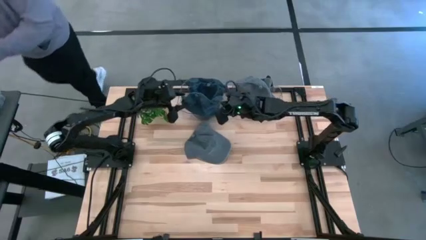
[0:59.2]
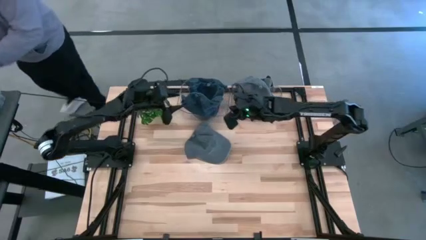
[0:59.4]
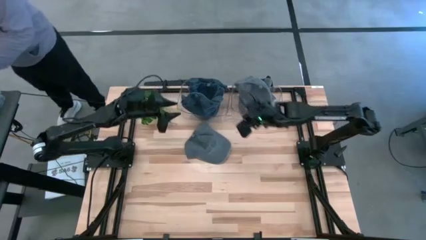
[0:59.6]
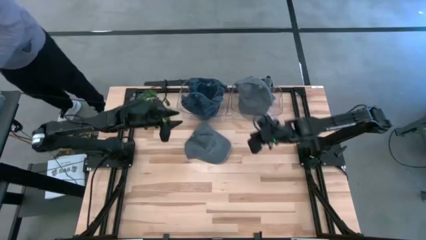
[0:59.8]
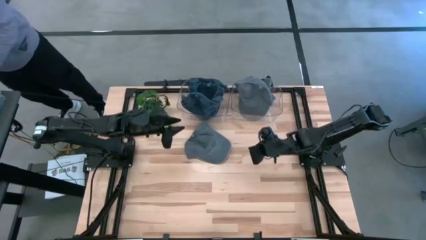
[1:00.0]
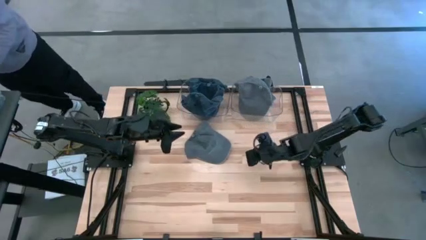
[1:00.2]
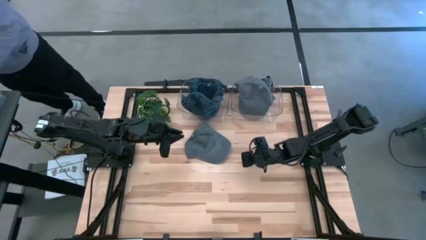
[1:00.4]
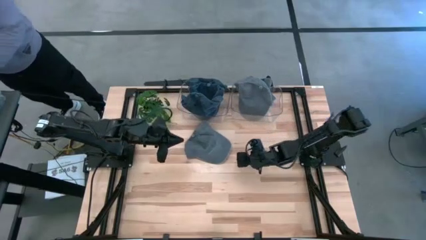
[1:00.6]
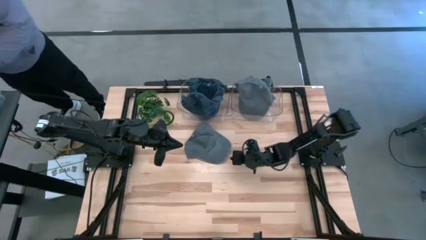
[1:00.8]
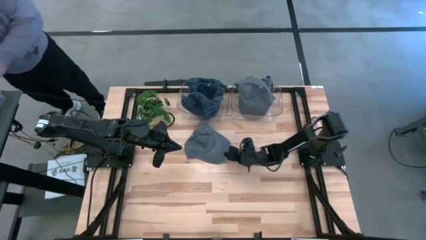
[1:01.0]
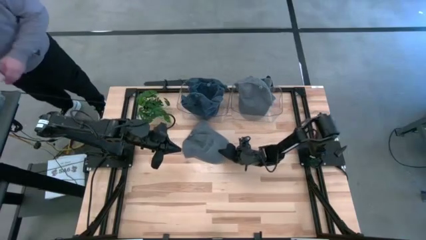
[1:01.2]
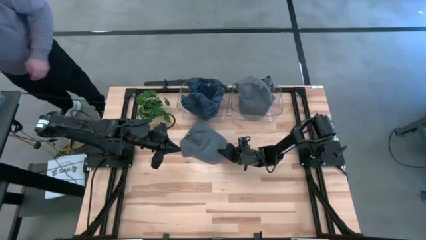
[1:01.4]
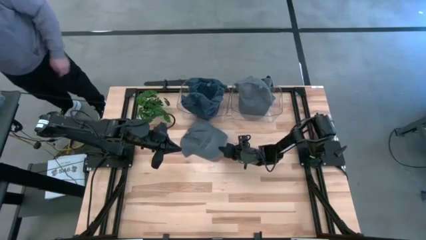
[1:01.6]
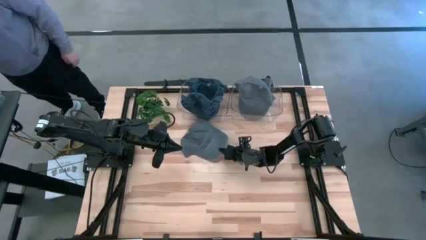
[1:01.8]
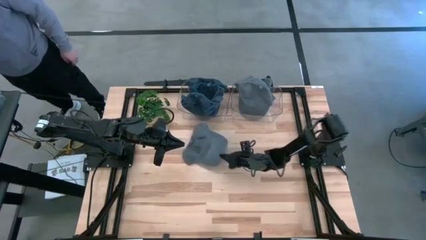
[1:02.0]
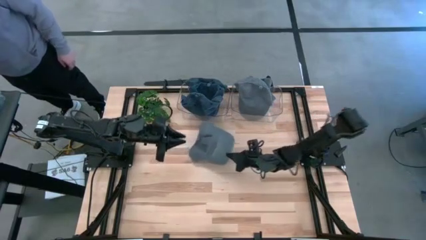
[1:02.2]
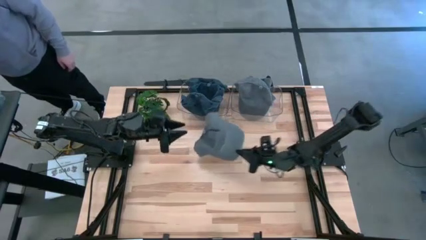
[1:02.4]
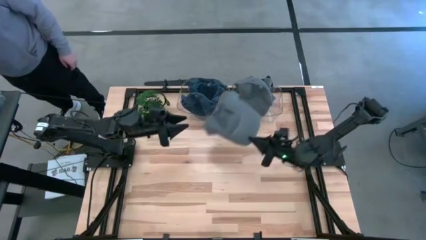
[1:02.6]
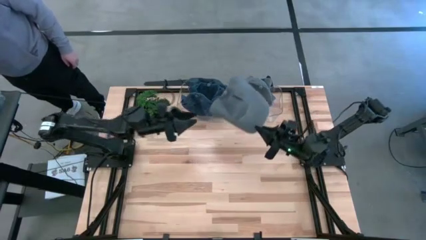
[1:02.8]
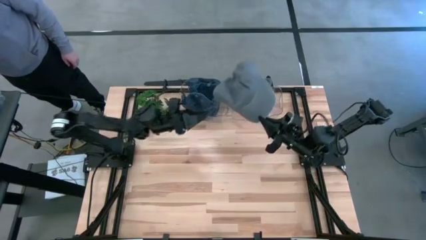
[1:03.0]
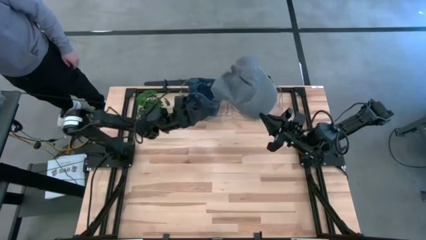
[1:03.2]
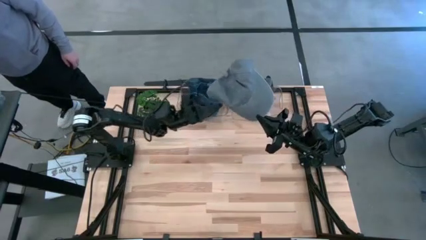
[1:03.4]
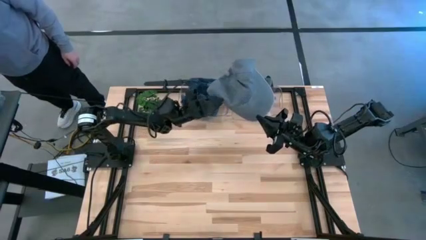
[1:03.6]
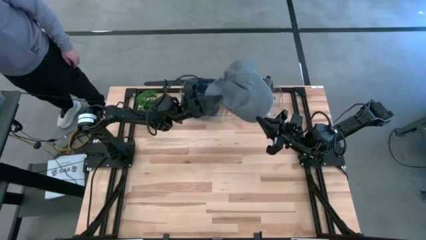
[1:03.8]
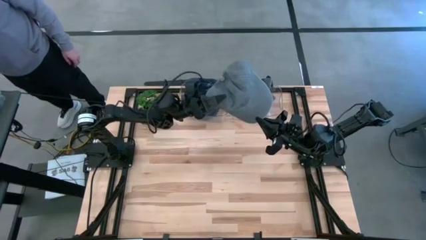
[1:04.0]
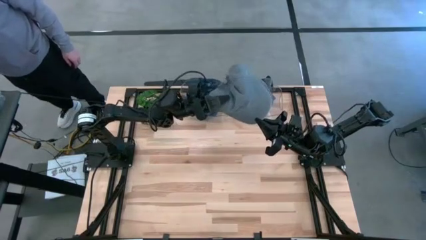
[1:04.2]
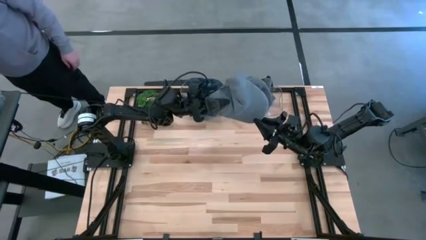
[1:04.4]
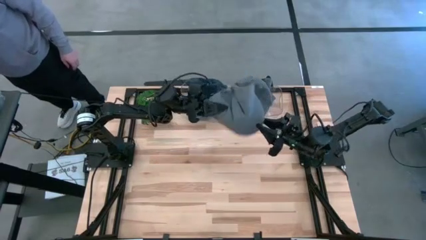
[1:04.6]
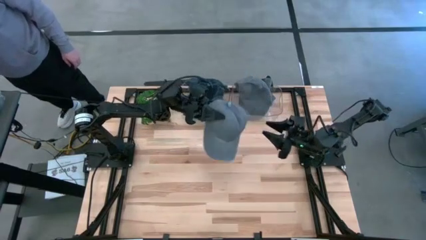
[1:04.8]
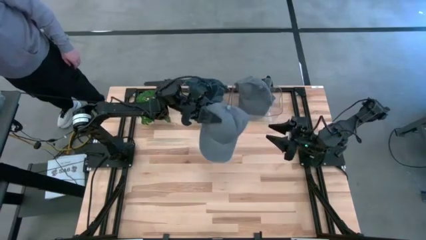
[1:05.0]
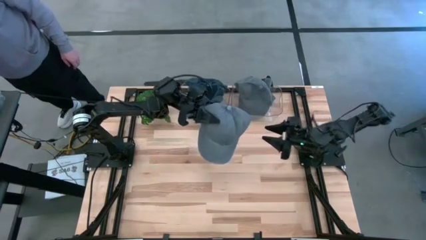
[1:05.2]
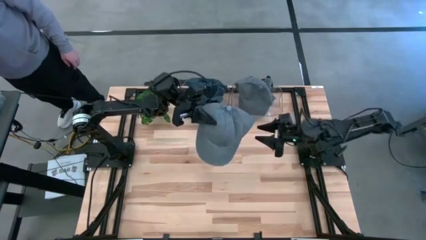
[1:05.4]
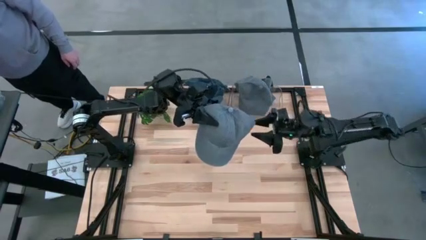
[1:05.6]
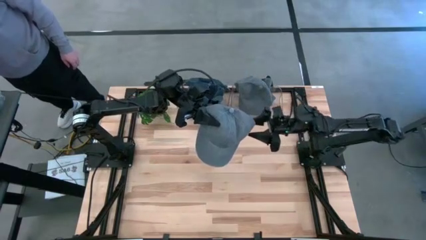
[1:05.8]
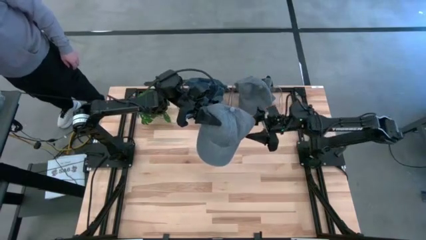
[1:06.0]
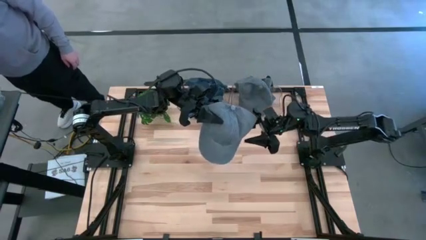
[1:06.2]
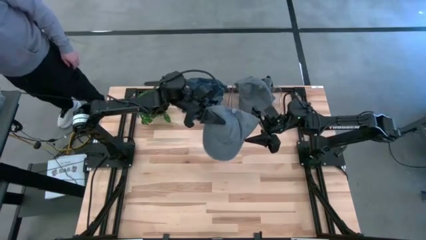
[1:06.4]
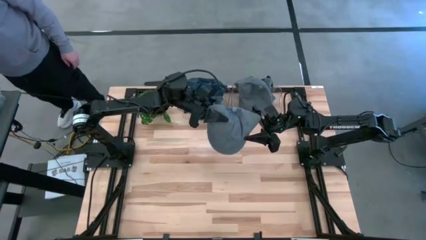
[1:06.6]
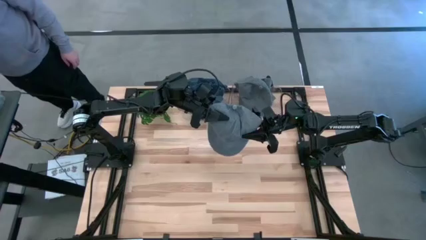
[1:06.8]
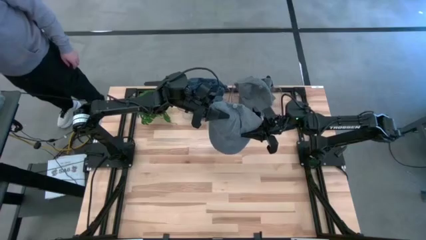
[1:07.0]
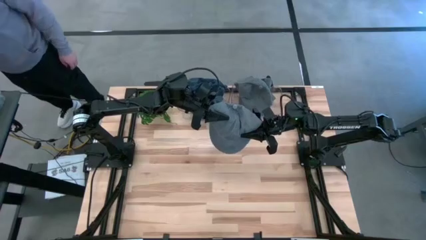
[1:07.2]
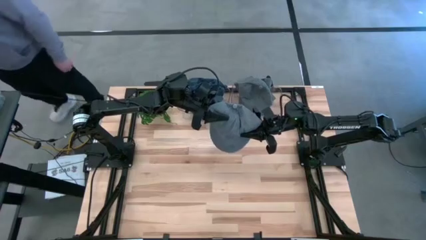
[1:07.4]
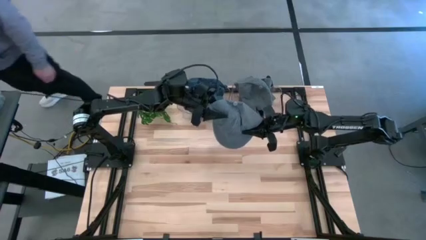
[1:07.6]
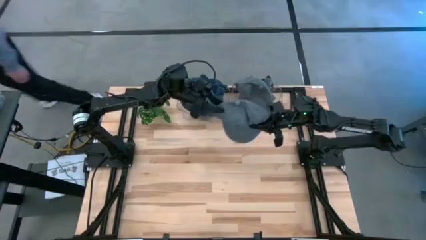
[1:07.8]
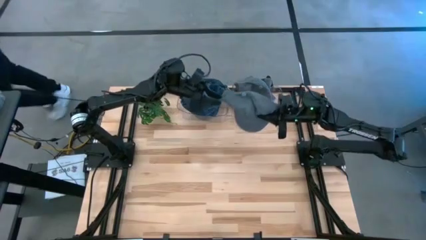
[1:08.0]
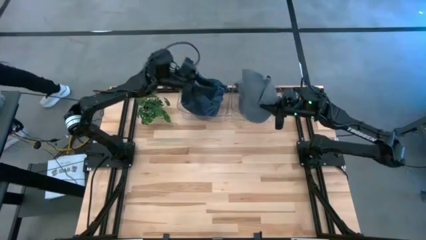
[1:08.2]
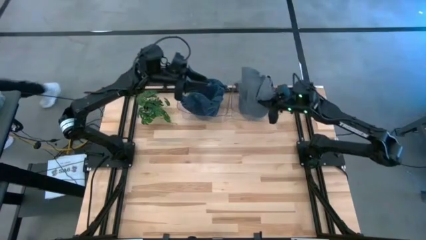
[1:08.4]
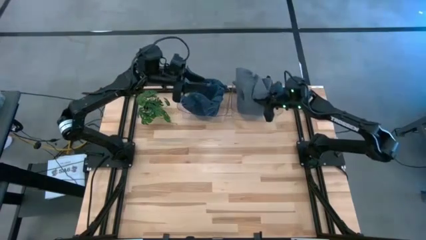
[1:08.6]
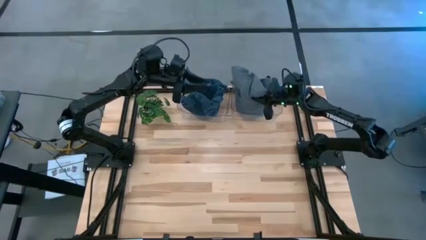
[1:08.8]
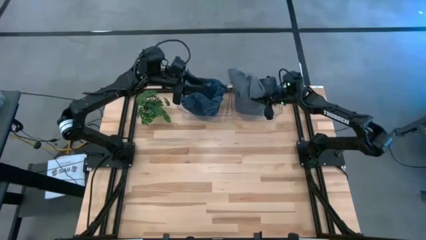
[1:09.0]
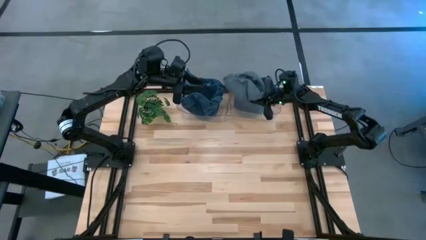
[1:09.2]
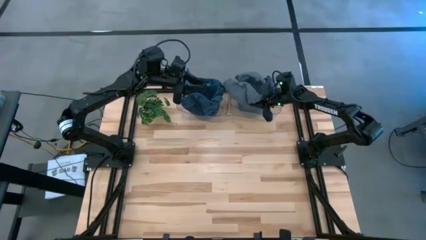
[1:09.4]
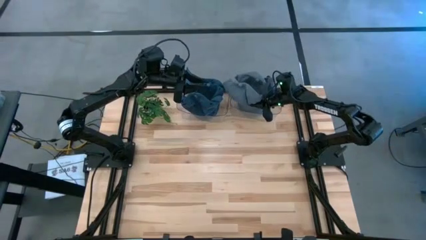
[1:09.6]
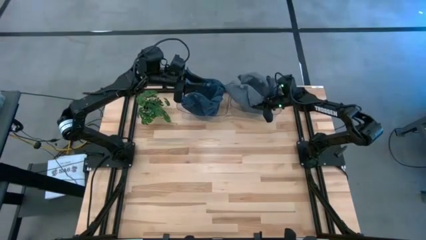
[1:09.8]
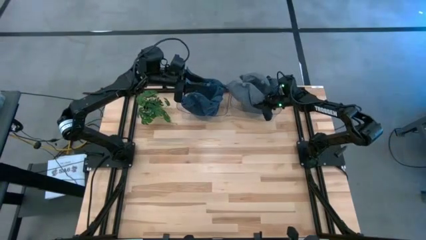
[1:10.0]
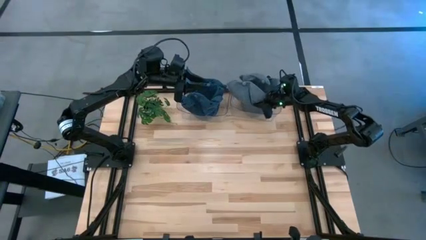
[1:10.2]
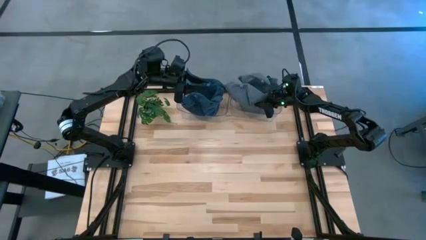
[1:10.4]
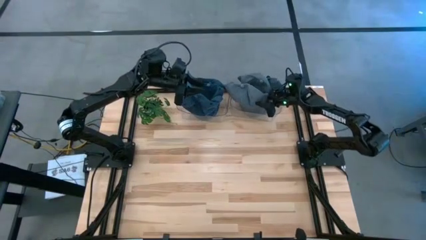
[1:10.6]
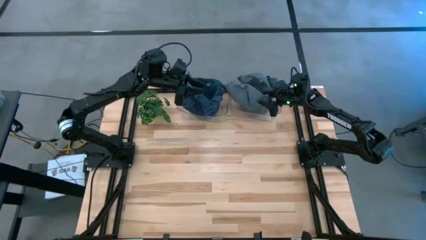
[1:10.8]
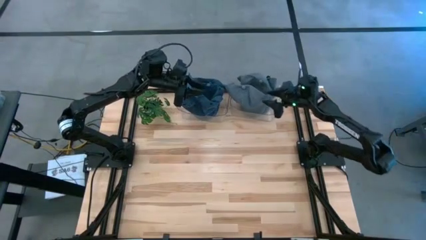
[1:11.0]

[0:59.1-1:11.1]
Task: Pick & Place hat
Put the gray cap into the right transparent bin
